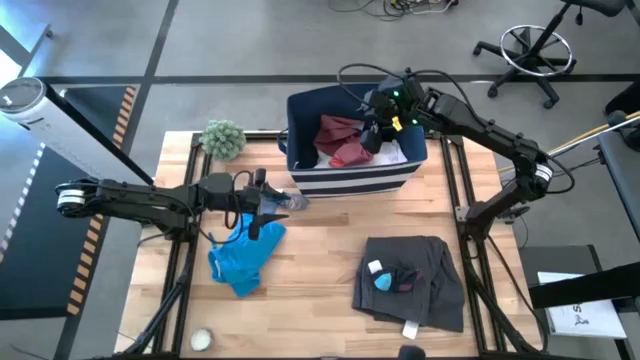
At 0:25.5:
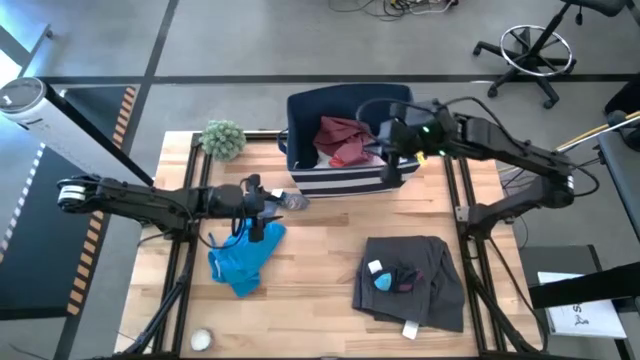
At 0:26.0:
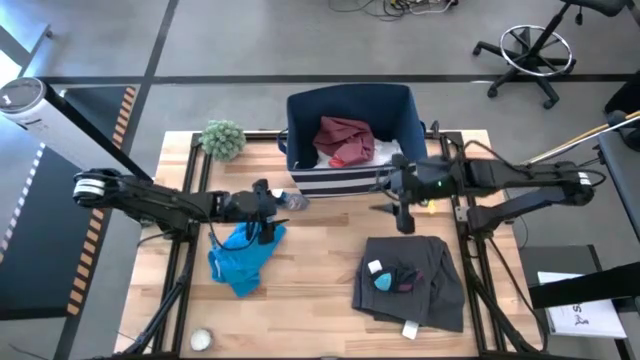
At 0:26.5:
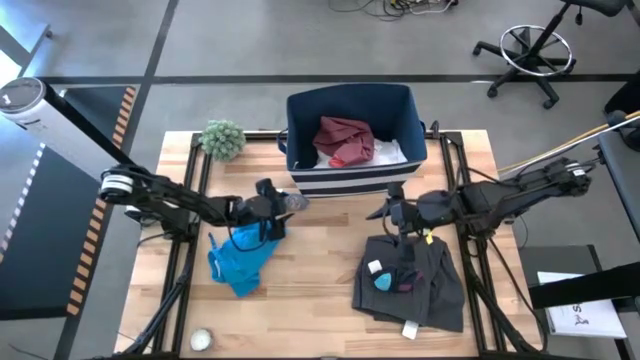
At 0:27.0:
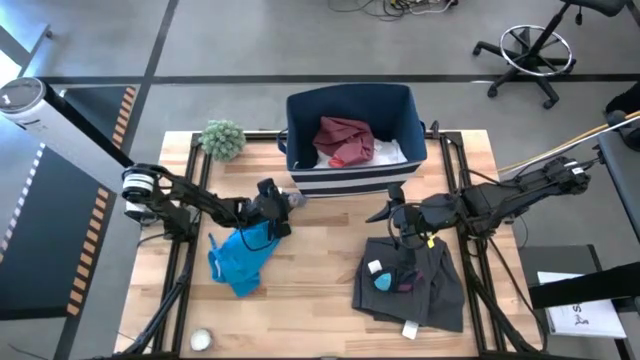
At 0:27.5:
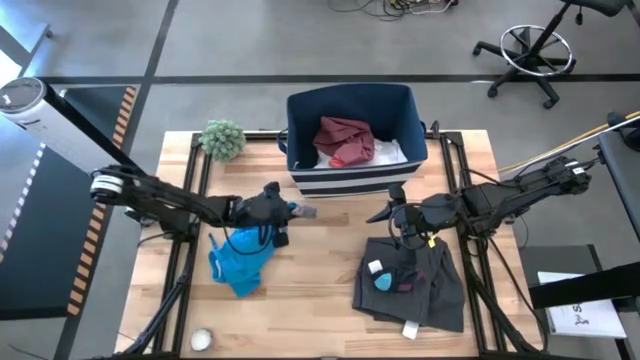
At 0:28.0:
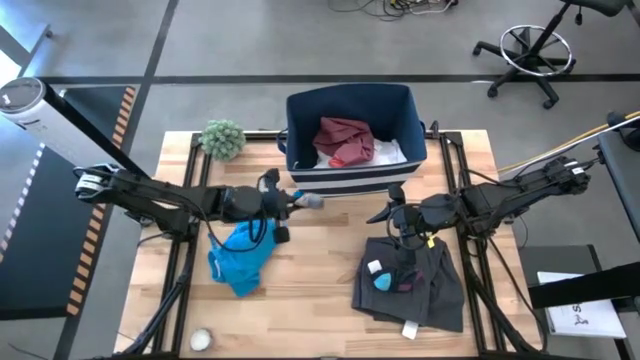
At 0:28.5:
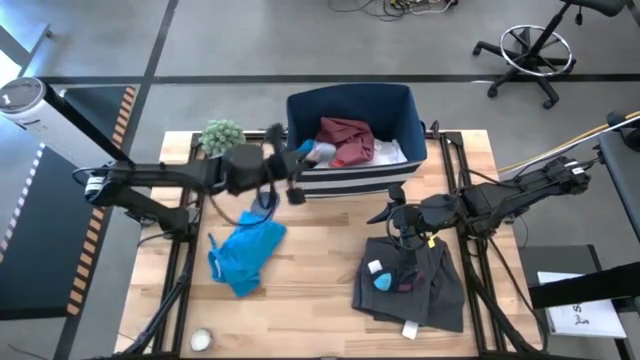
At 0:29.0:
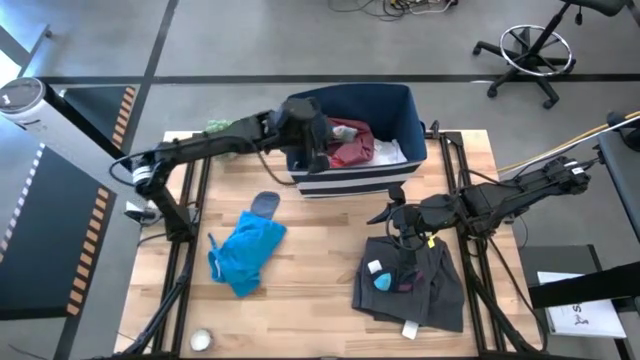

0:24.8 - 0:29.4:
Task: Sort clothes
Put the gray pair of socks into the blue laundry bin

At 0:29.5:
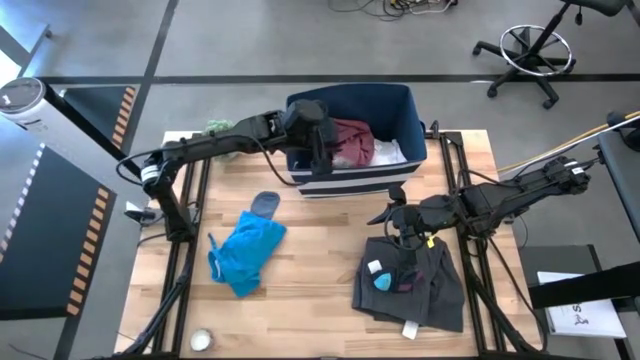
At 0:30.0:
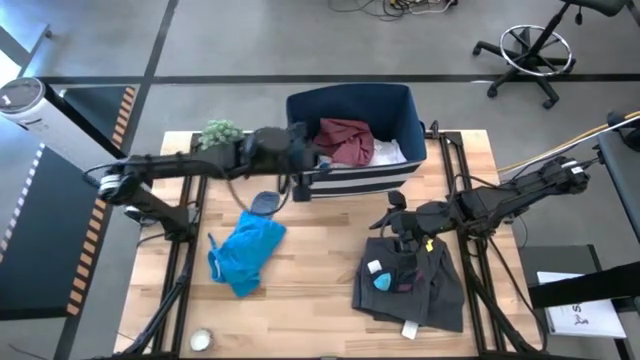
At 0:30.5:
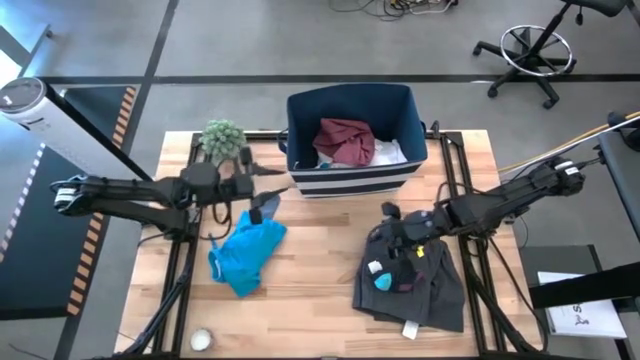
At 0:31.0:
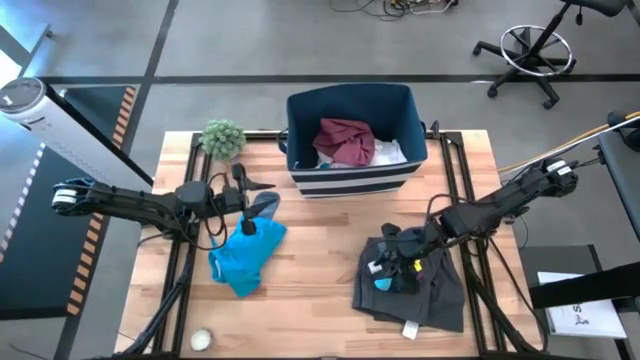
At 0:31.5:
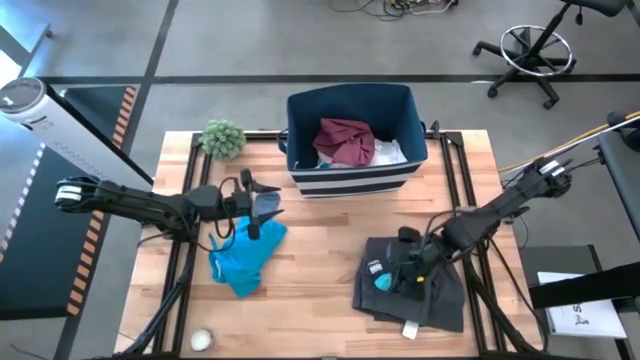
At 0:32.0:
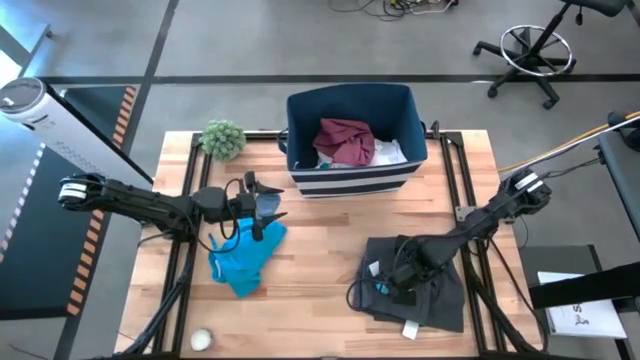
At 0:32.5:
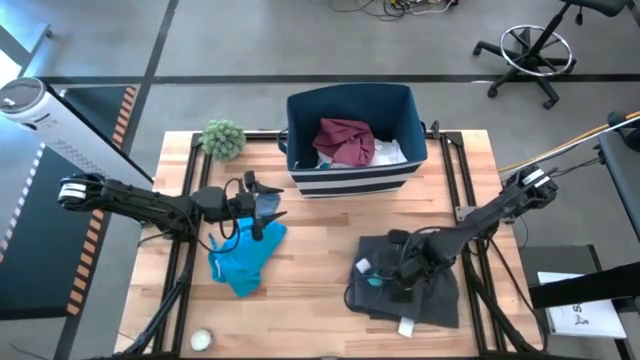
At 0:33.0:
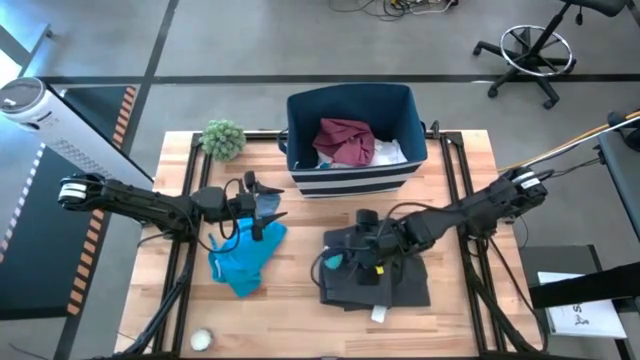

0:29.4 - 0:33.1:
Put the black pants into the blue laundry bin

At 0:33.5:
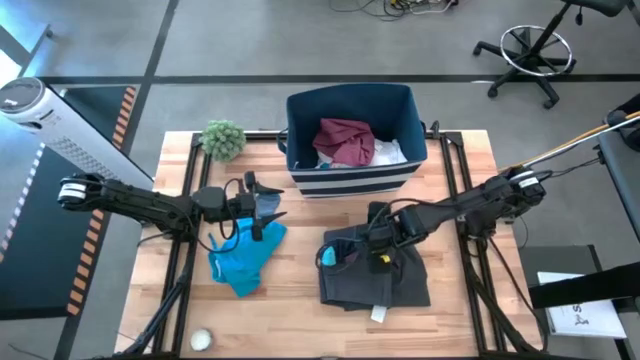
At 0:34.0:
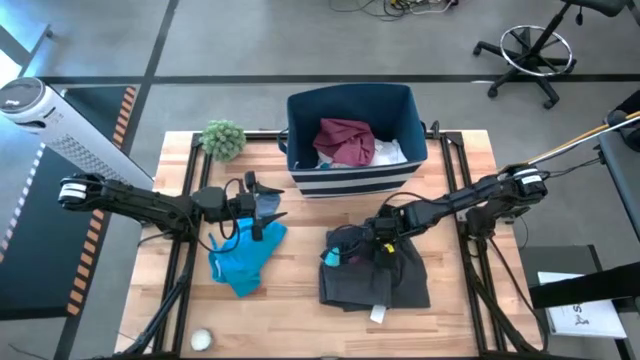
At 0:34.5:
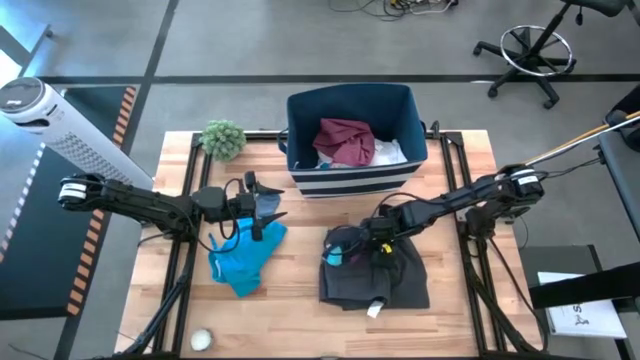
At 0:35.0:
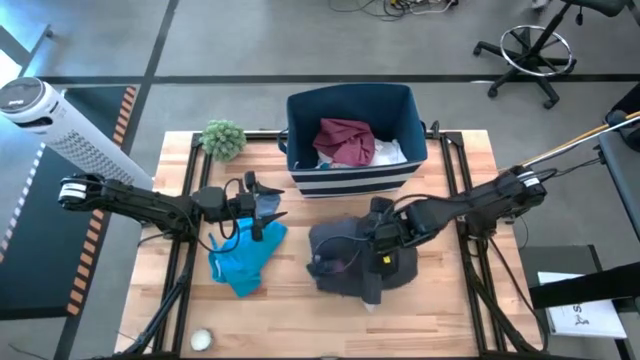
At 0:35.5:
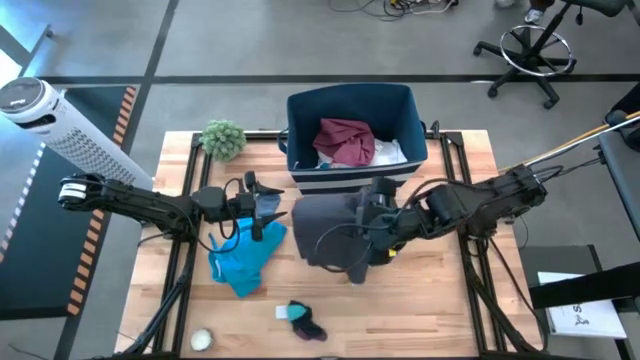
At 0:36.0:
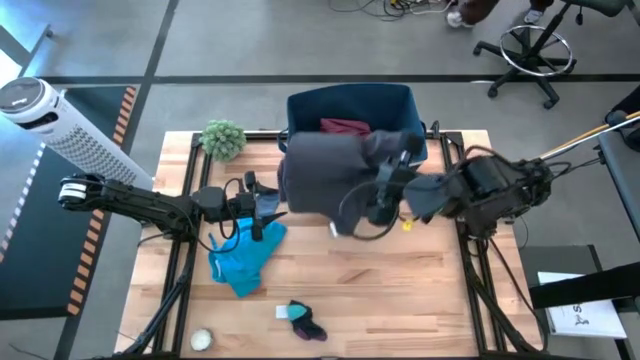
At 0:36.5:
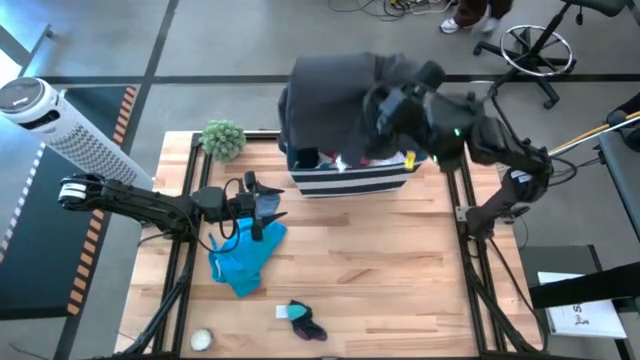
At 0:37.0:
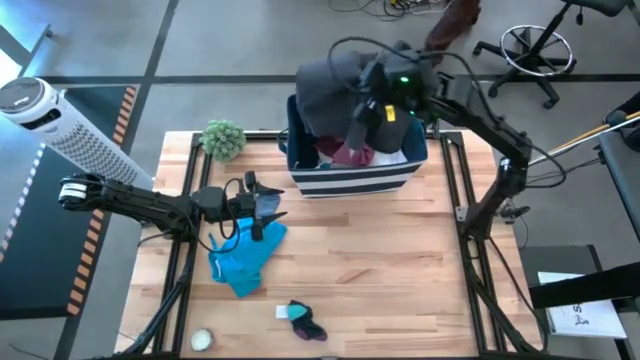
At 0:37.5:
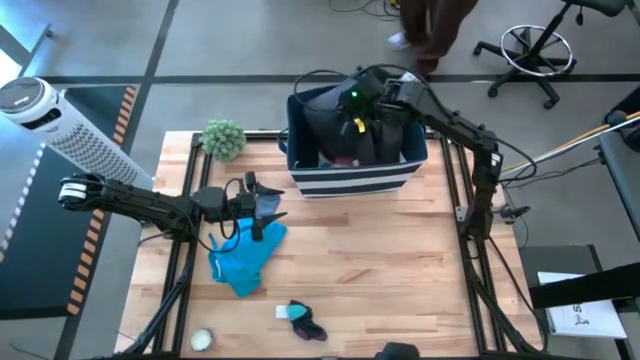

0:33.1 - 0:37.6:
Put the black pants into the blue laundry bin

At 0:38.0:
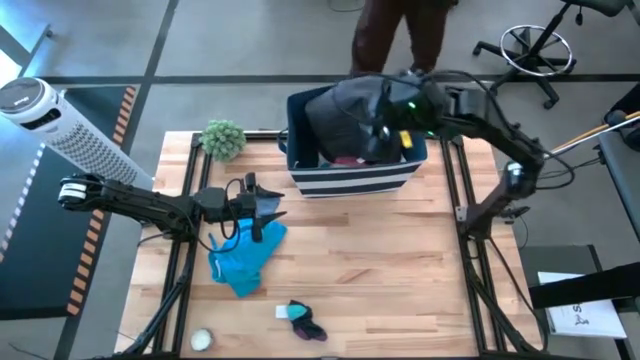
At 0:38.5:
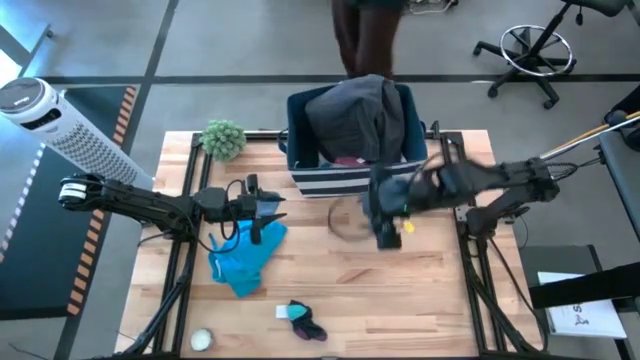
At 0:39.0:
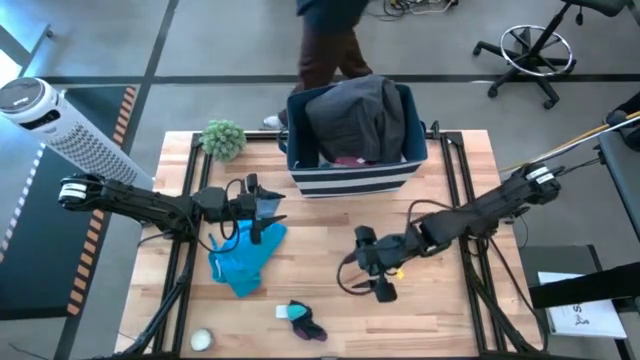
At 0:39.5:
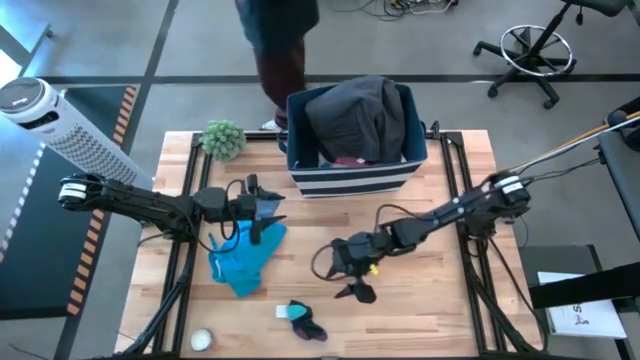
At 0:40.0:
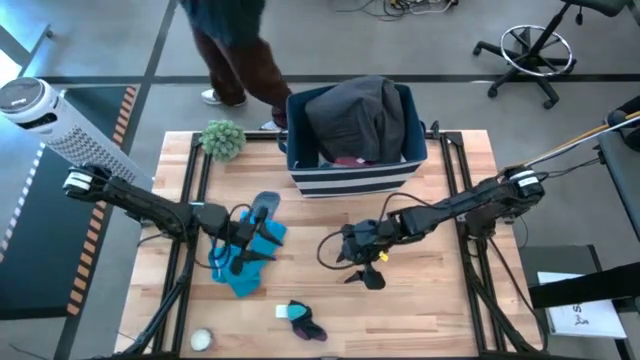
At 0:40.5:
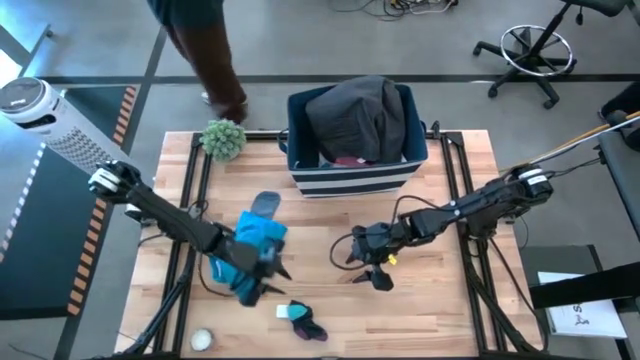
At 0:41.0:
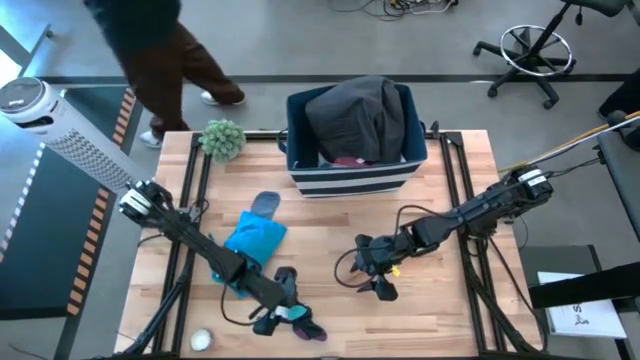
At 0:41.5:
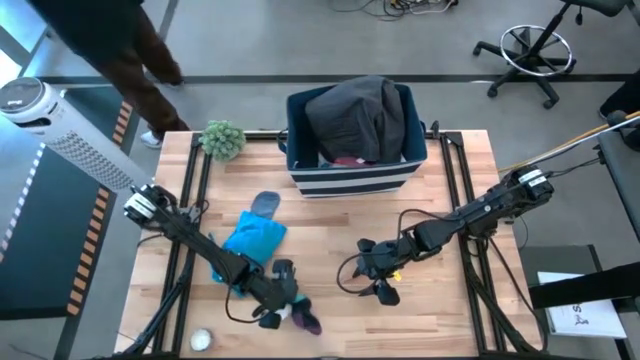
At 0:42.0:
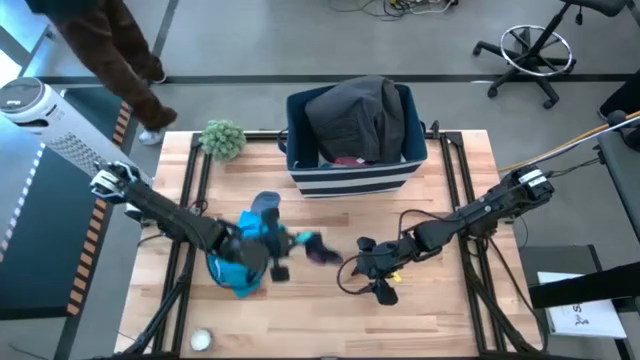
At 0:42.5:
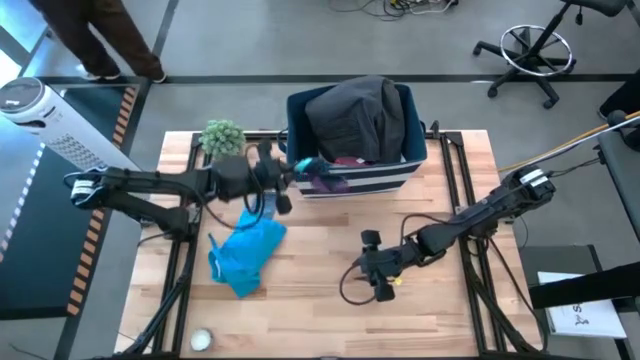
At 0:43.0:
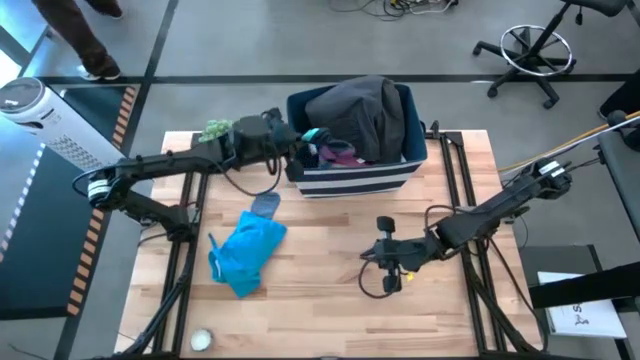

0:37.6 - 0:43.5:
Put the dark blue pair of socks into the blue laundry bin

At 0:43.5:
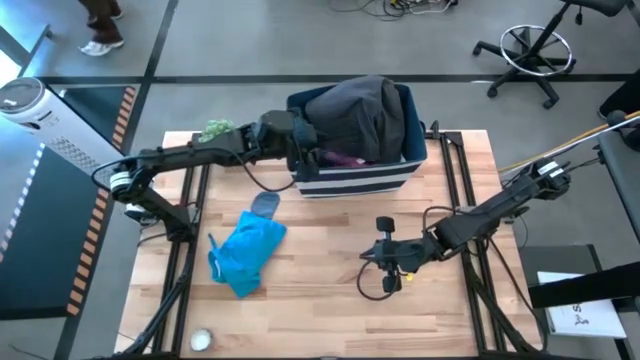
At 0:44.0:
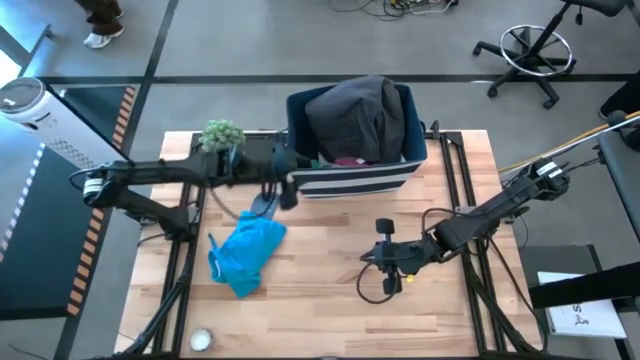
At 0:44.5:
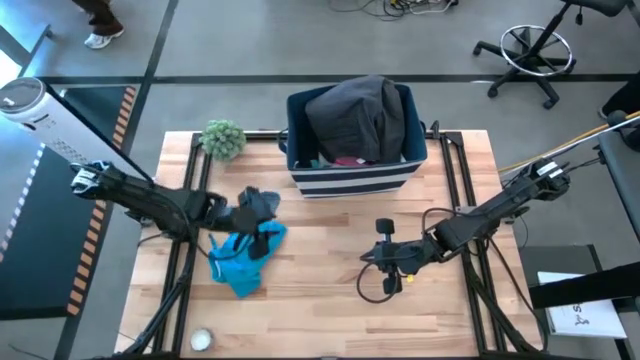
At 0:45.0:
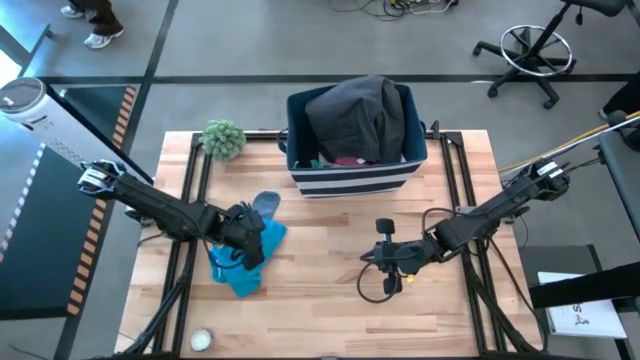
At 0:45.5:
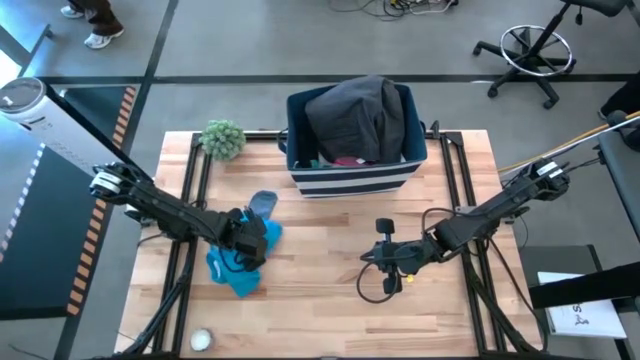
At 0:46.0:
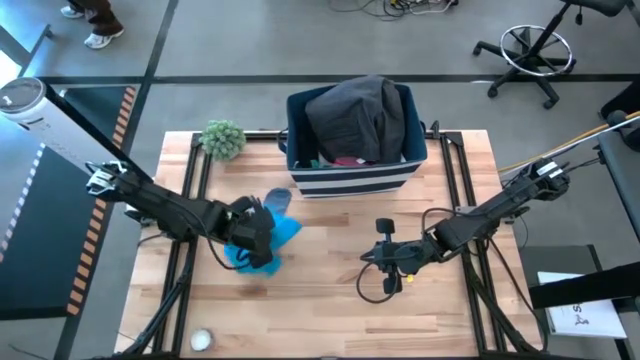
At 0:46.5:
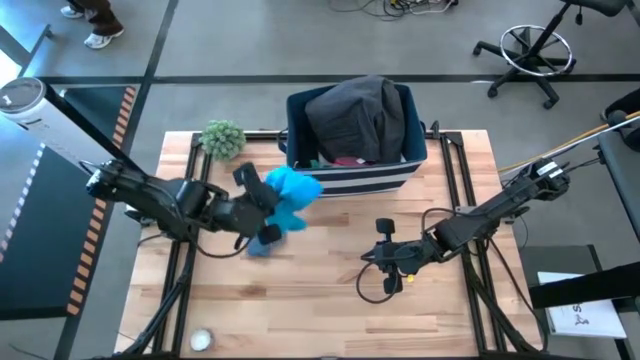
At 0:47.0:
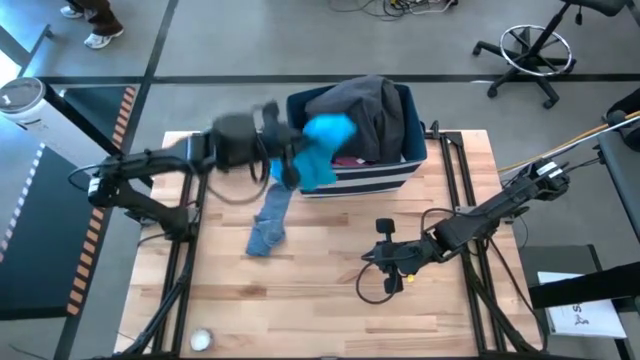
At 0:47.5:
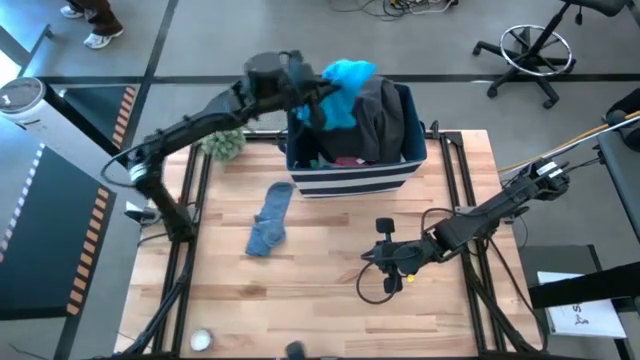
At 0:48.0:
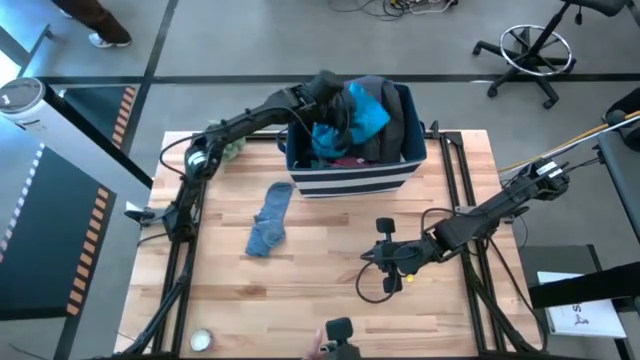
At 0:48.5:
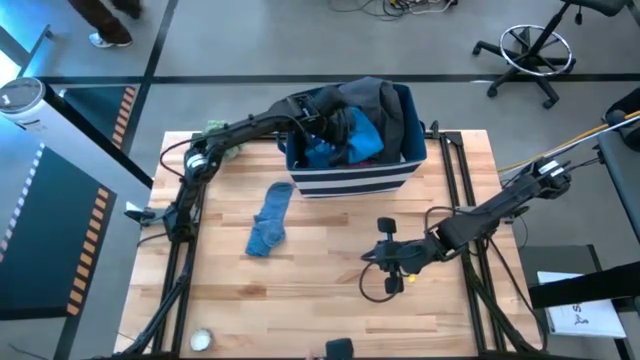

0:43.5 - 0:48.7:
Put the blue shorts into the blue laundry bin
